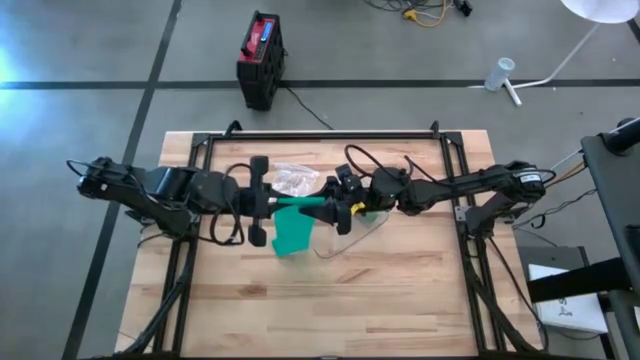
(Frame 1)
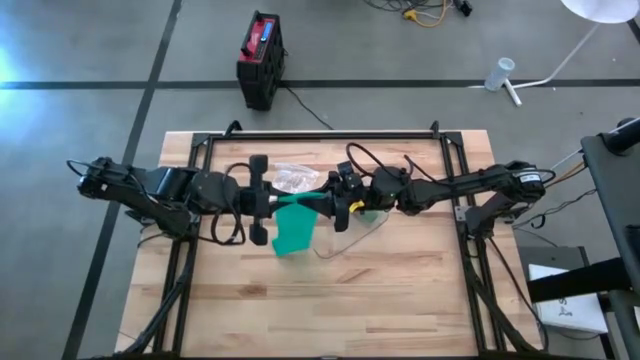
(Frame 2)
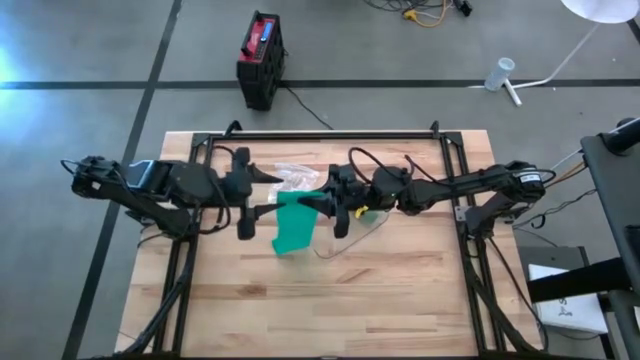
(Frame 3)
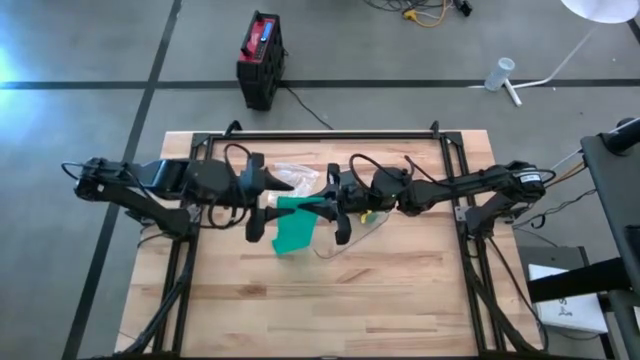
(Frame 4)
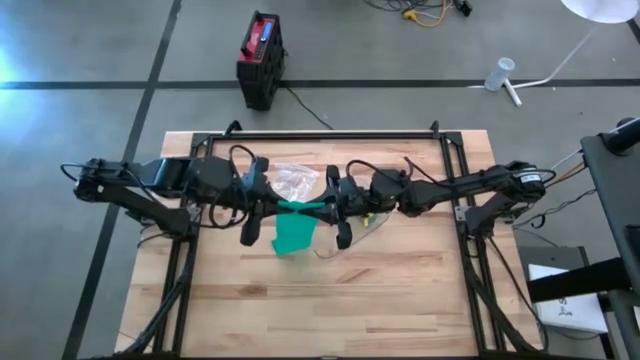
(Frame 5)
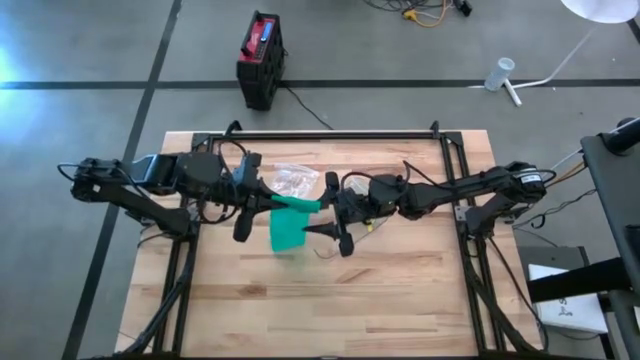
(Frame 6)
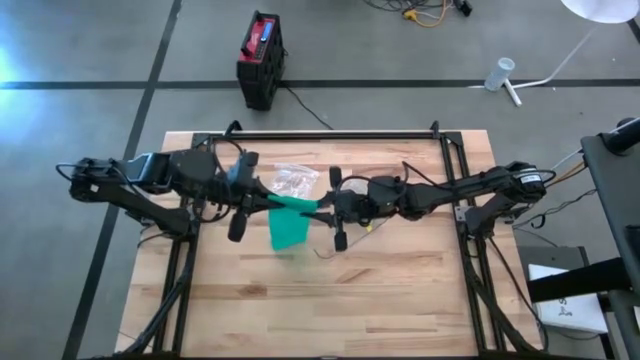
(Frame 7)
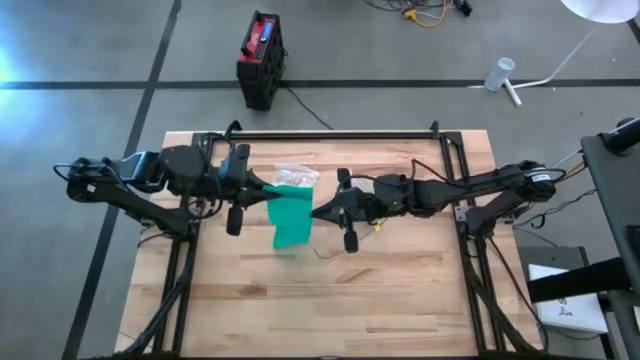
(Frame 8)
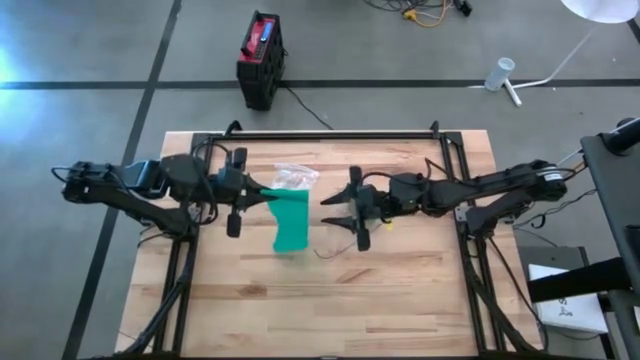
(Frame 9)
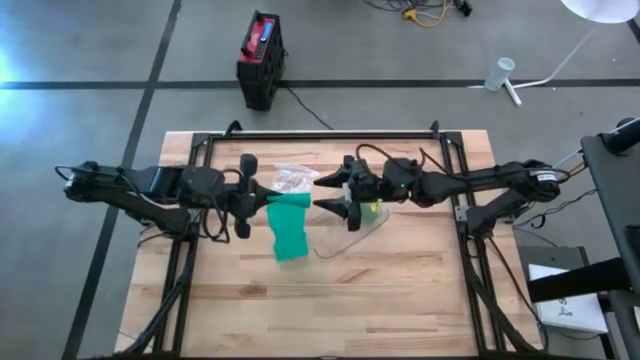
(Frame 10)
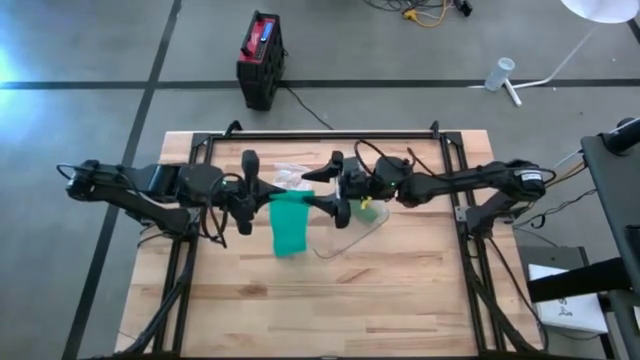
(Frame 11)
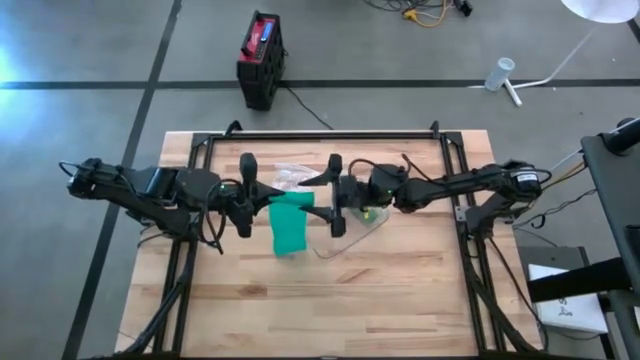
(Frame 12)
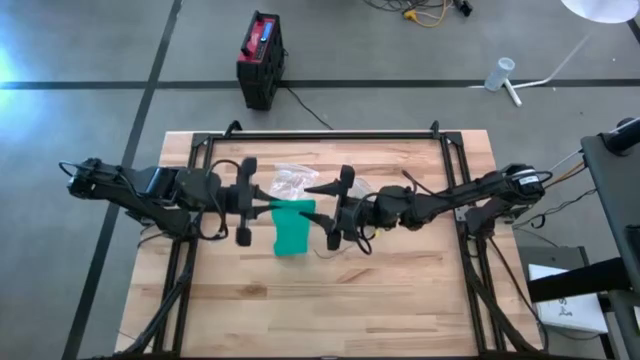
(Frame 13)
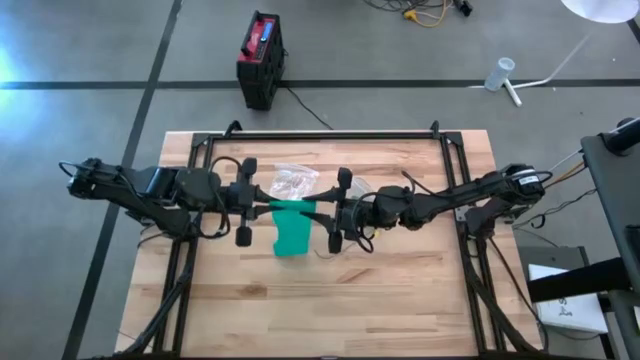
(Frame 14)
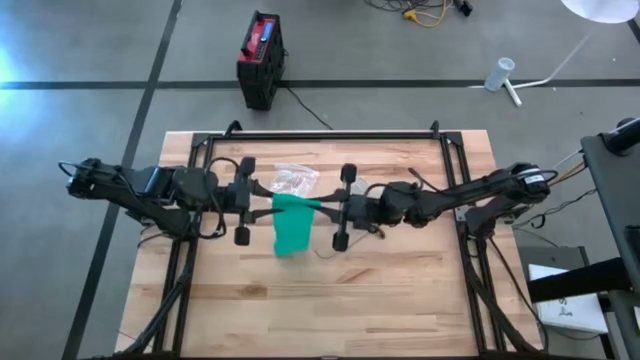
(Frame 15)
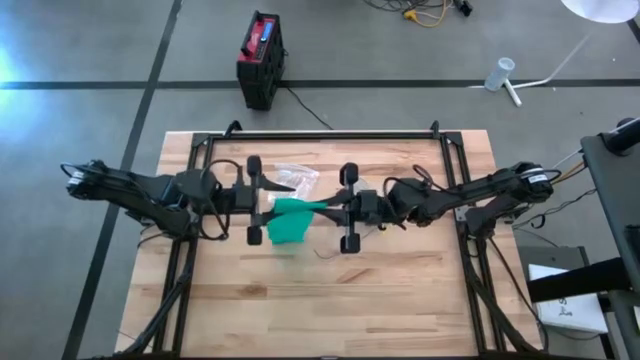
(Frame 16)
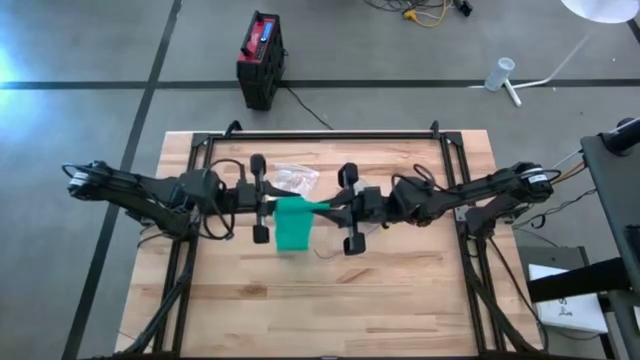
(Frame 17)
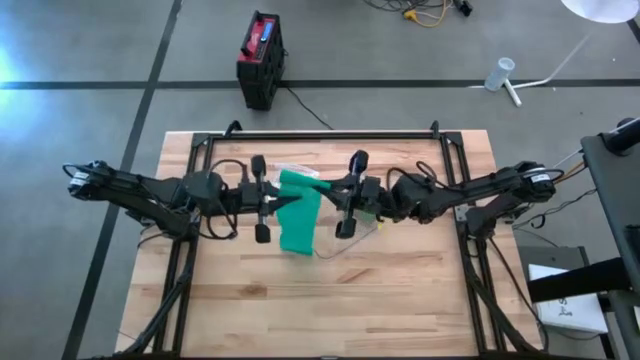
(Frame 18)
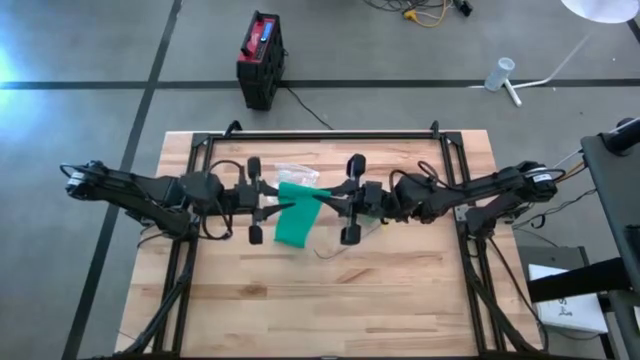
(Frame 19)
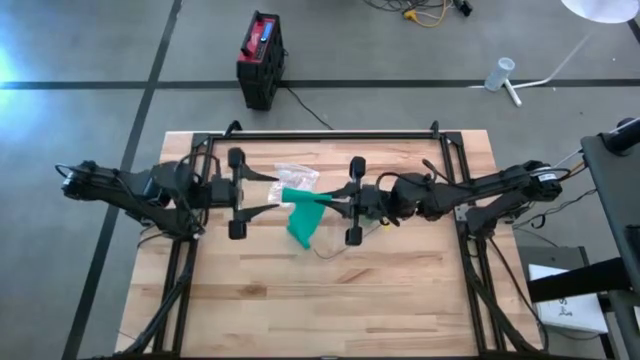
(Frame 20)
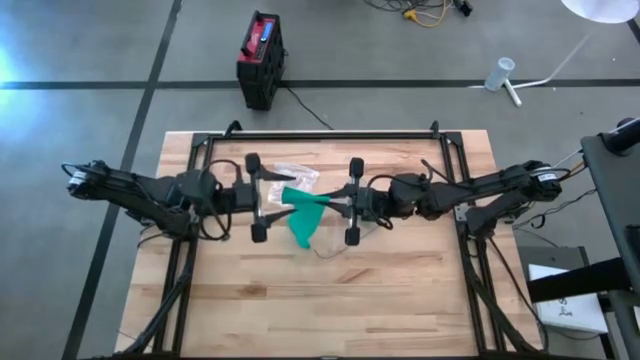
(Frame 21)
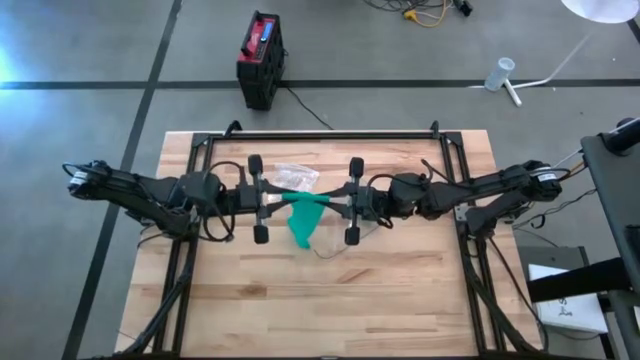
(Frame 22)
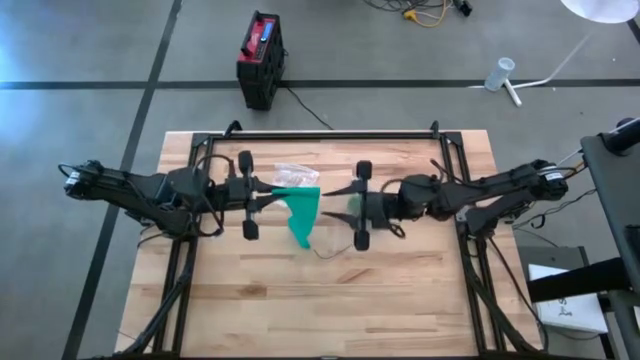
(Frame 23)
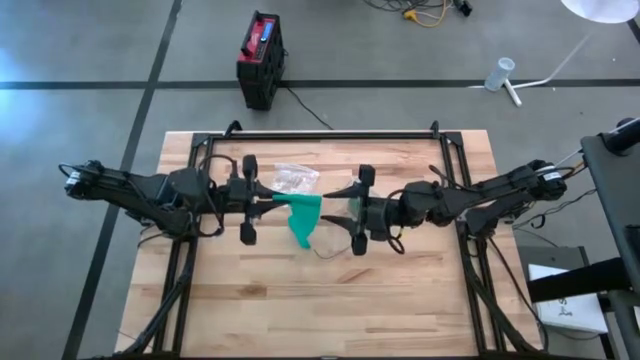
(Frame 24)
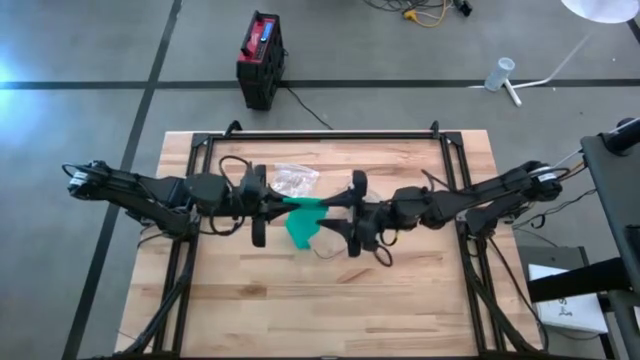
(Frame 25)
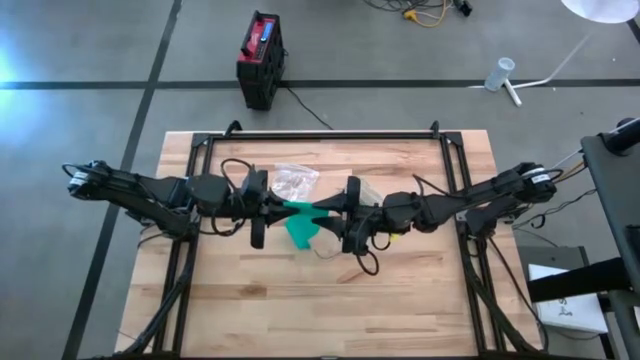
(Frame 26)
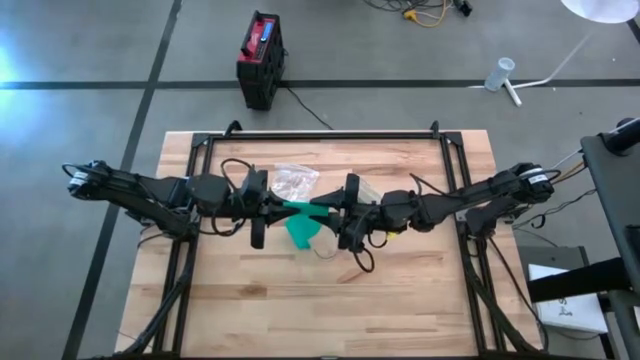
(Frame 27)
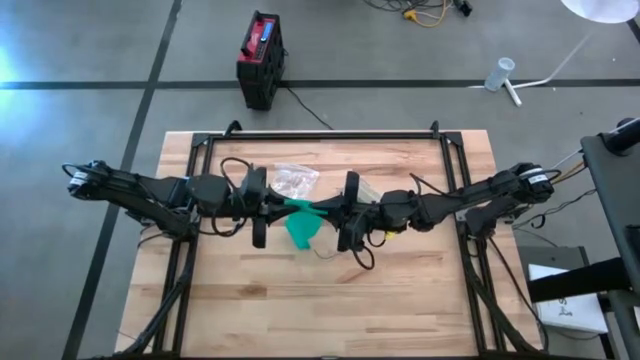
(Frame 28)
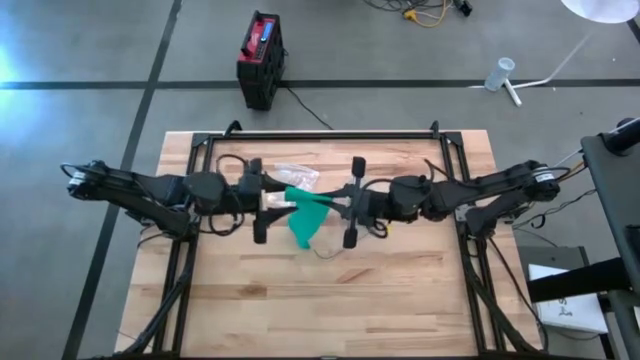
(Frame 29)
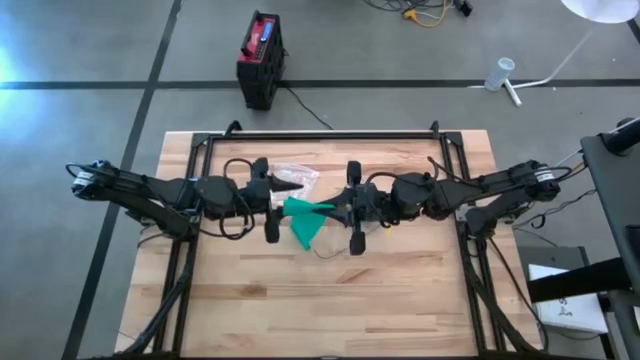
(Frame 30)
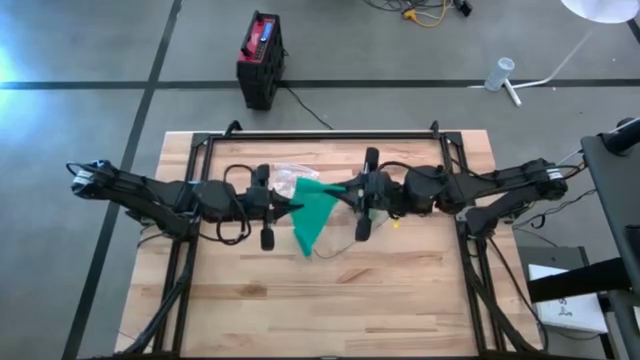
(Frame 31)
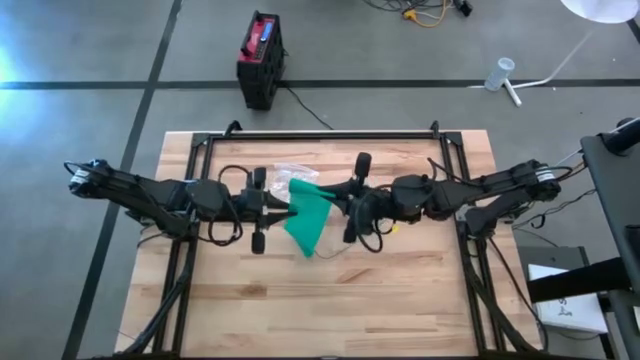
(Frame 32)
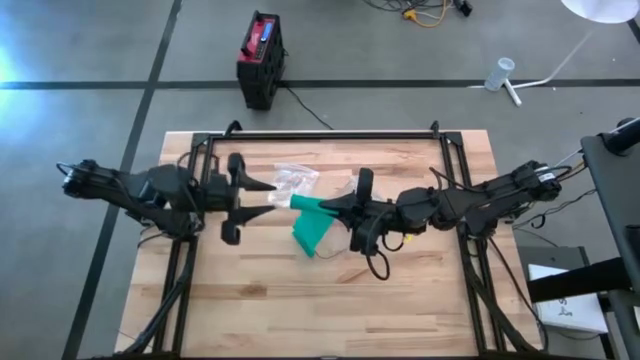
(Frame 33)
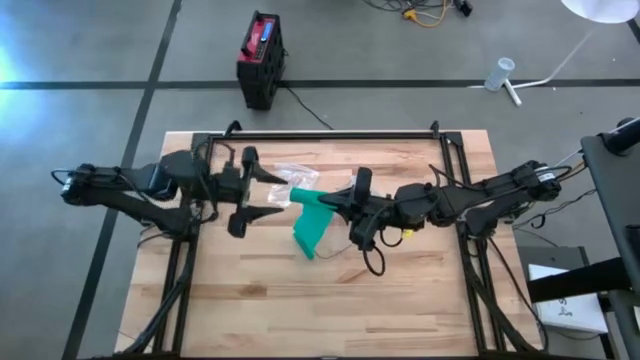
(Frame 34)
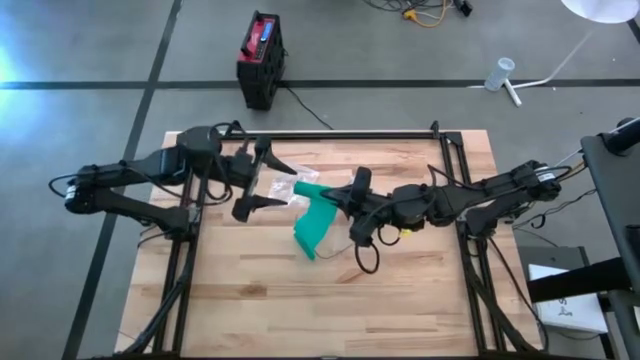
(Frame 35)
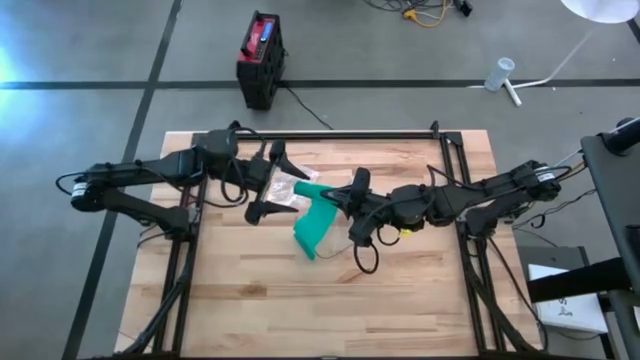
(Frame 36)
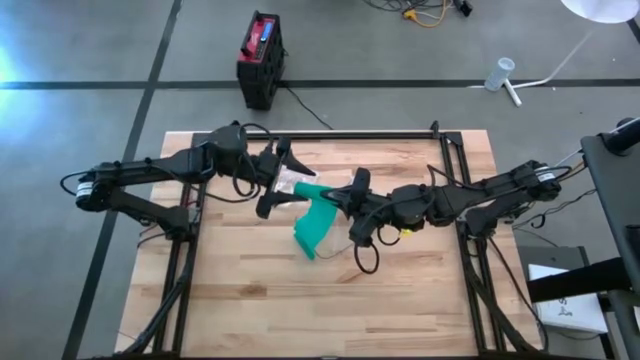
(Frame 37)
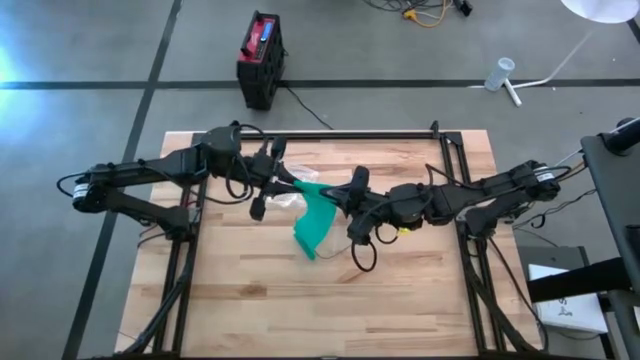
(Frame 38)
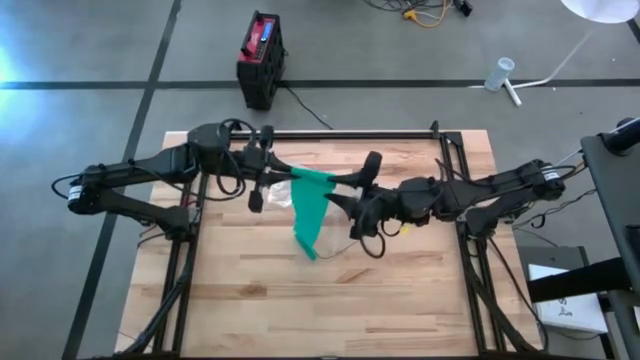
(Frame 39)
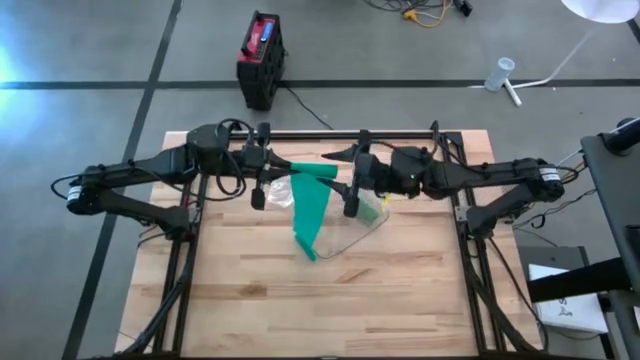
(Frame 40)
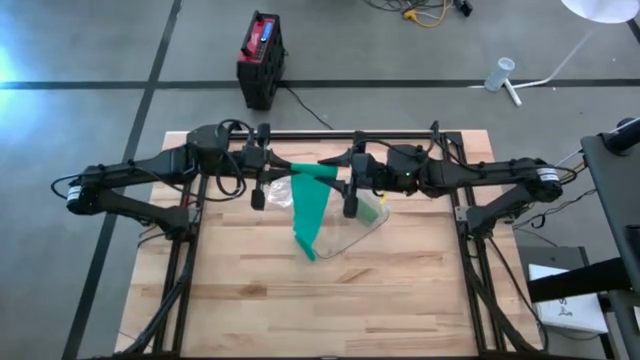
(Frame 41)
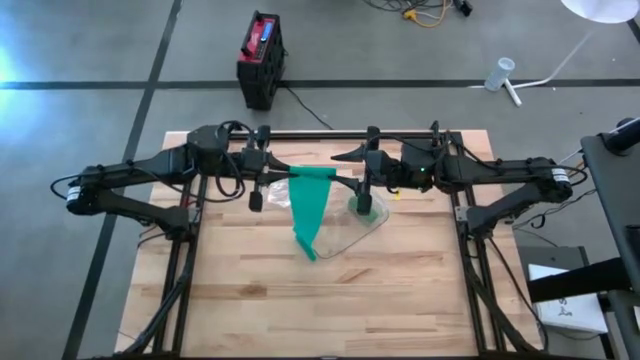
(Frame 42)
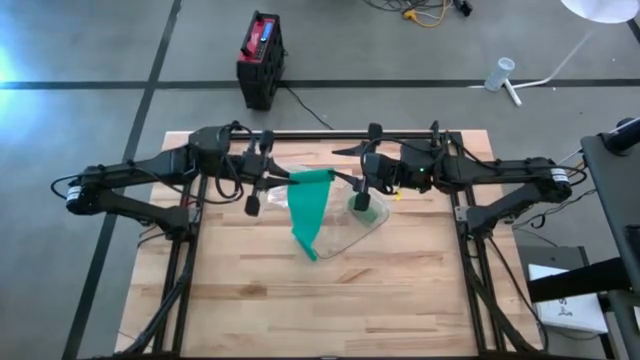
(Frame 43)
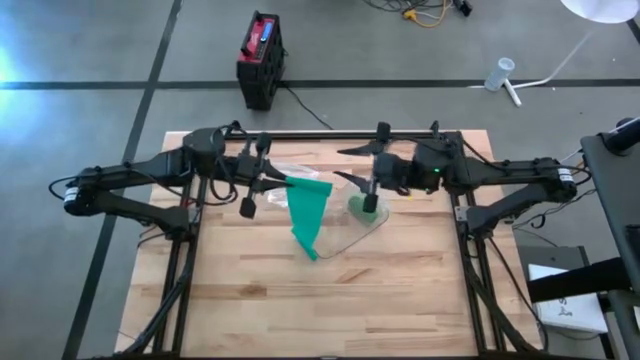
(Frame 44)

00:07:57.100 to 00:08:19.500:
Task: Roll bandage
Roll the dark green bandage
